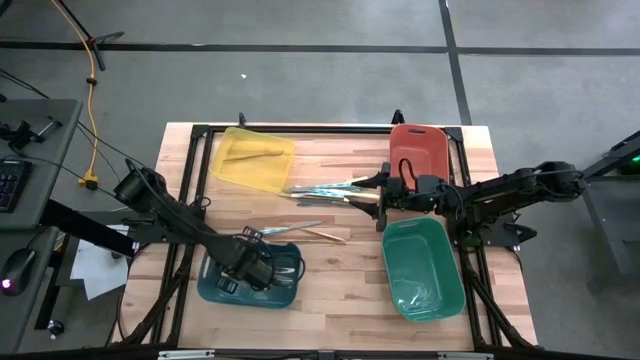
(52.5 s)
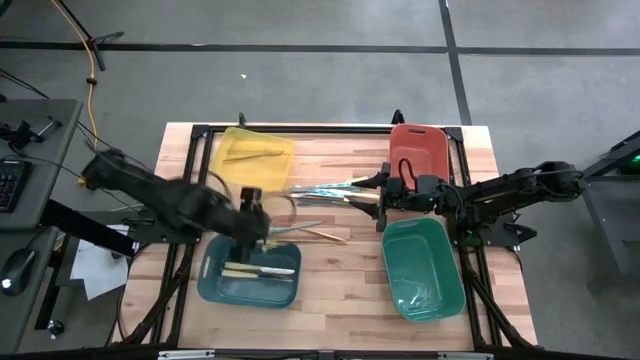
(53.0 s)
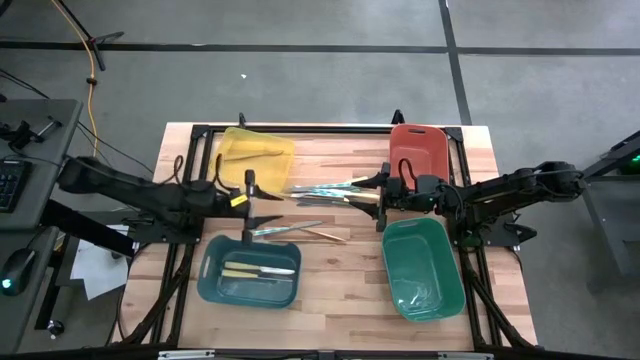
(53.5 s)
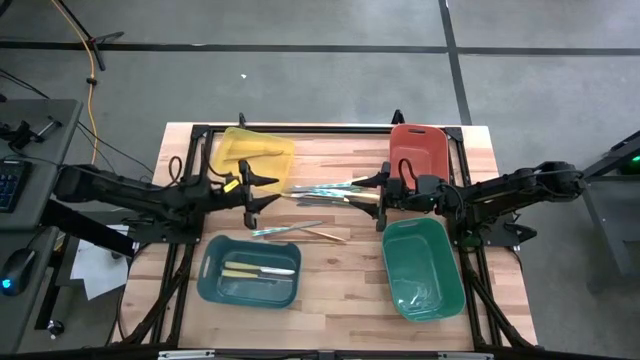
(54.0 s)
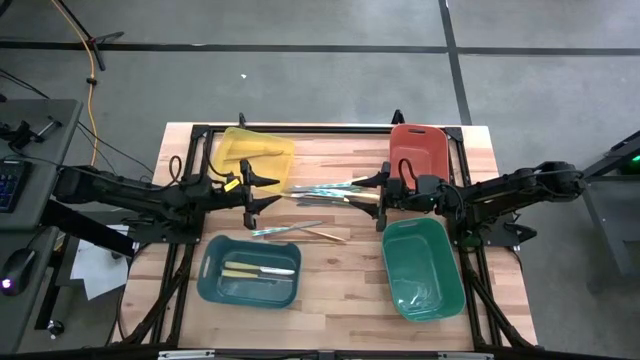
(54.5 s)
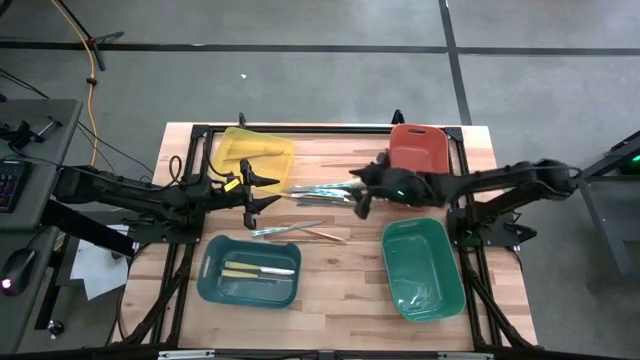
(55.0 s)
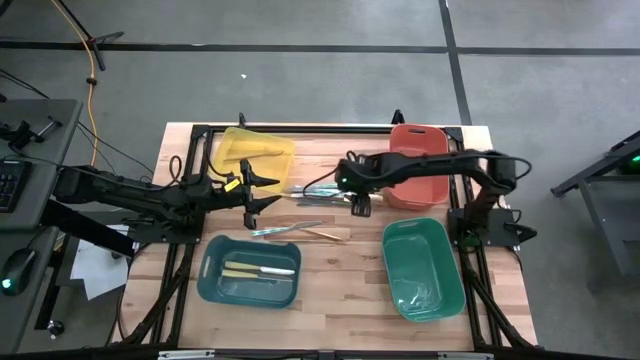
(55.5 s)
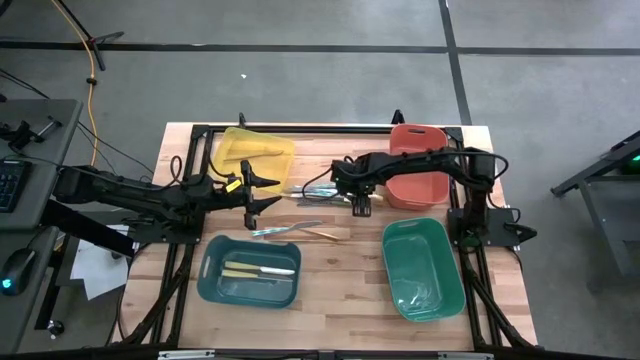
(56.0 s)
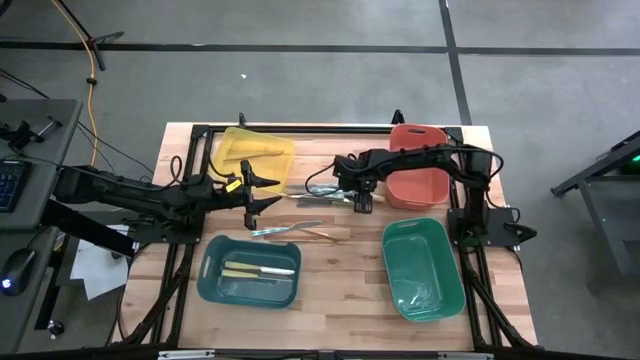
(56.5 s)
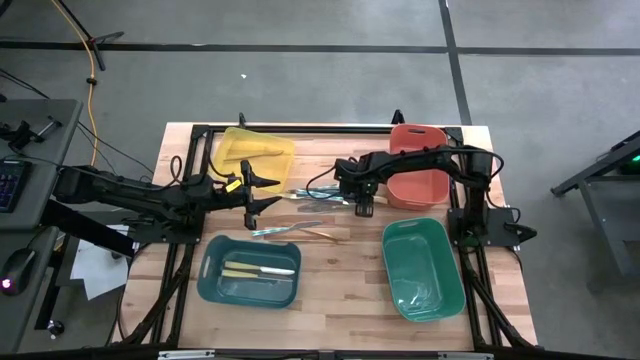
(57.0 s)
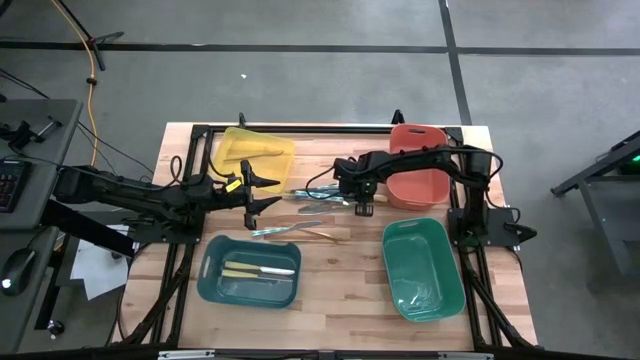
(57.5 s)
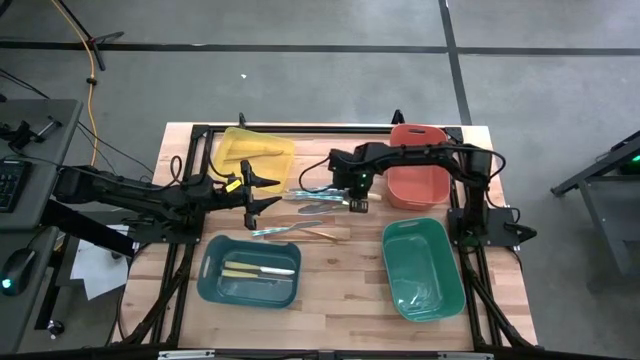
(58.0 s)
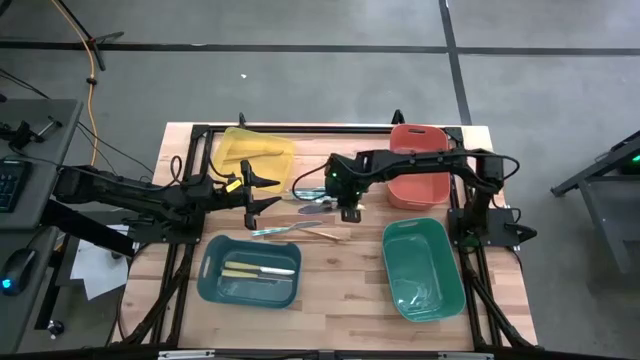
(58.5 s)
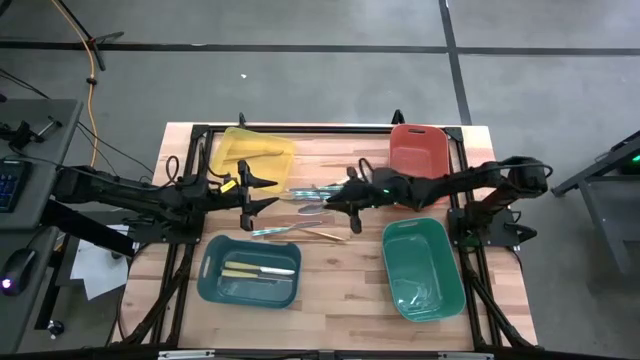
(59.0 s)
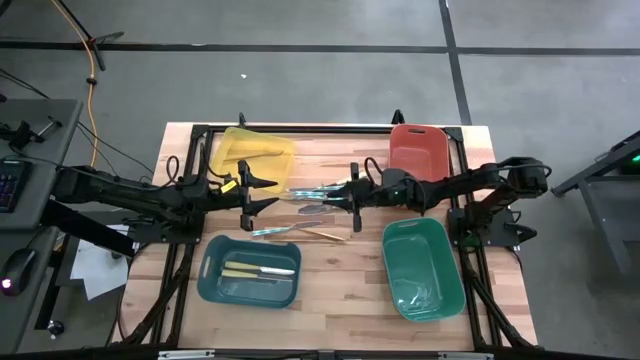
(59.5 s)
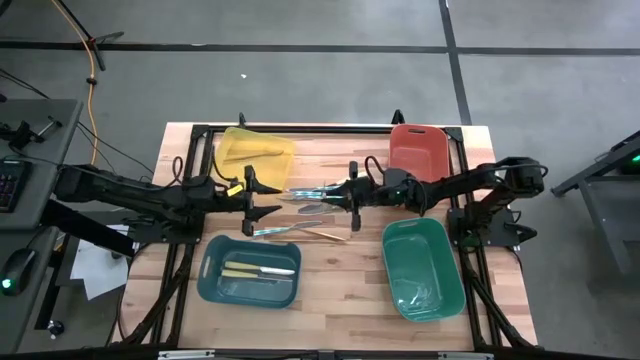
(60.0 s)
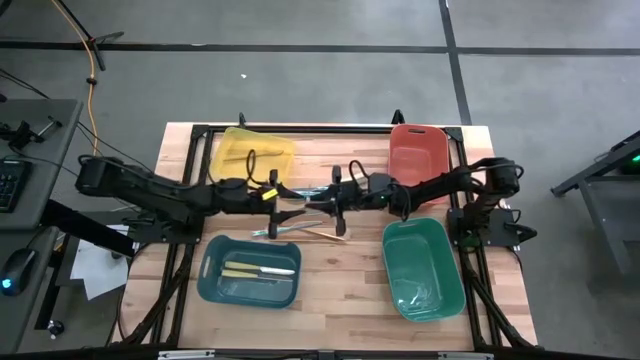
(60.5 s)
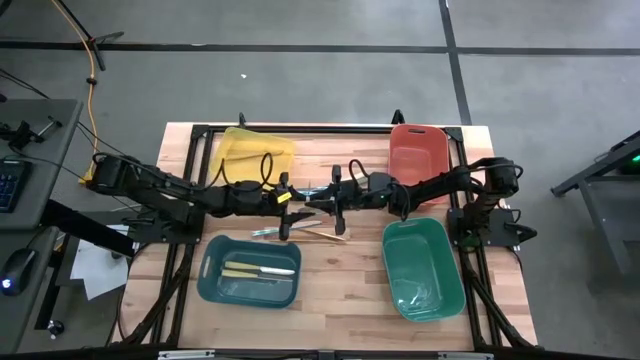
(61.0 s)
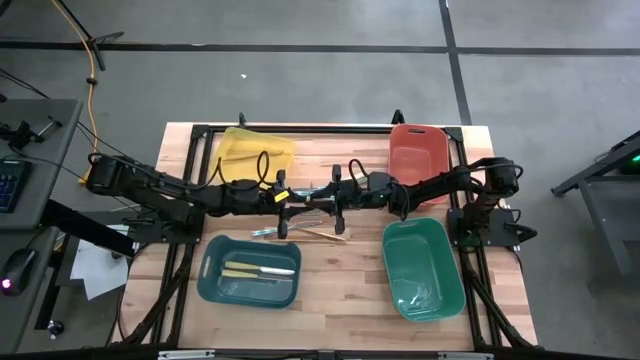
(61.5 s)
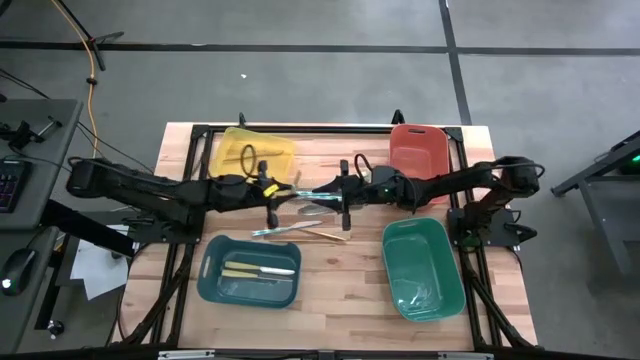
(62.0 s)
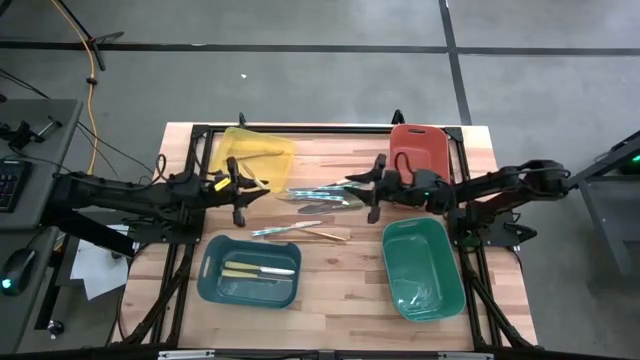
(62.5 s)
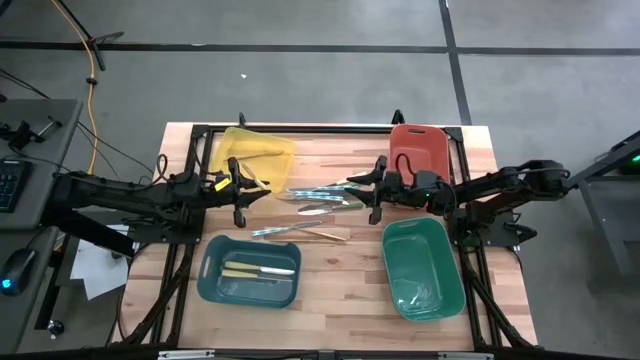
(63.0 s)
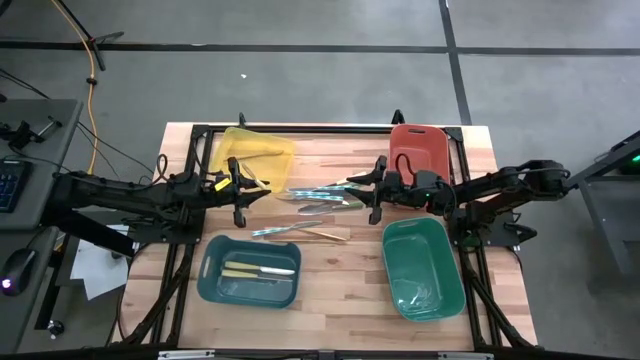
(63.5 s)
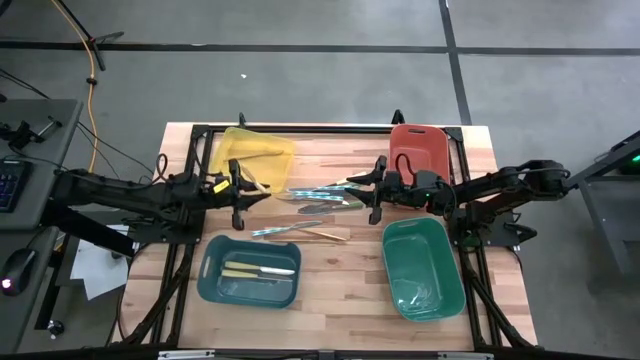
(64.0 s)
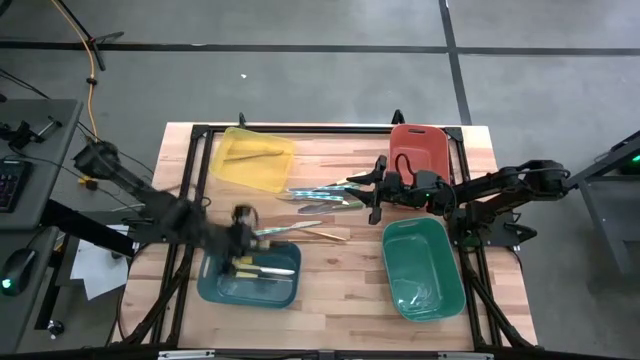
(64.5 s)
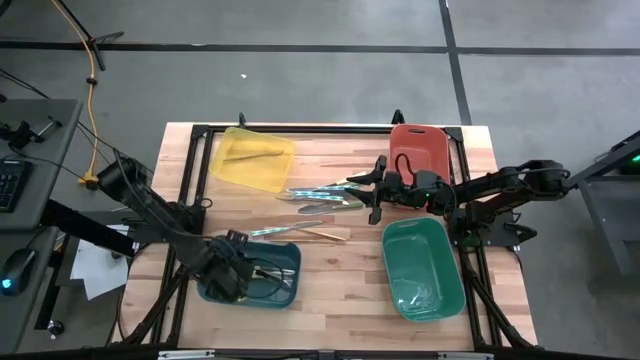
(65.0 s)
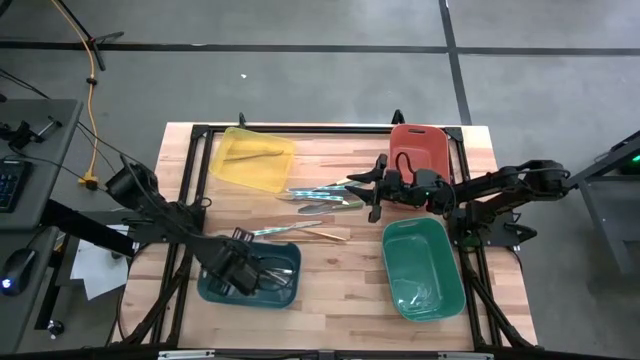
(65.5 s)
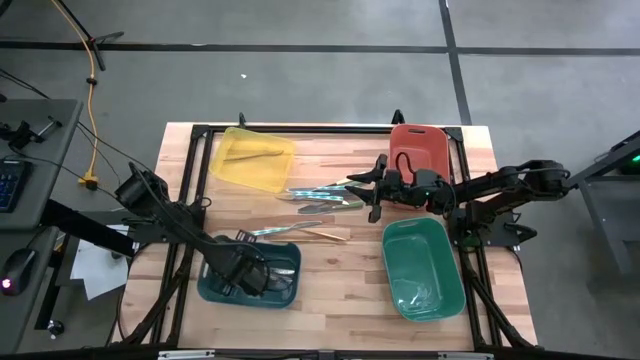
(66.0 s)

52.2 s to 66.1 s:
Task: Sort silverware by color (type)
Put the yellow knife into the blue bin

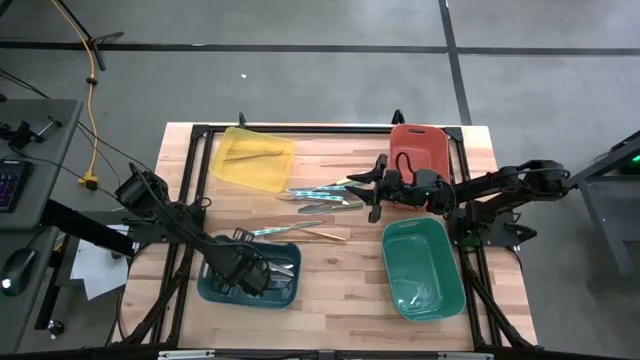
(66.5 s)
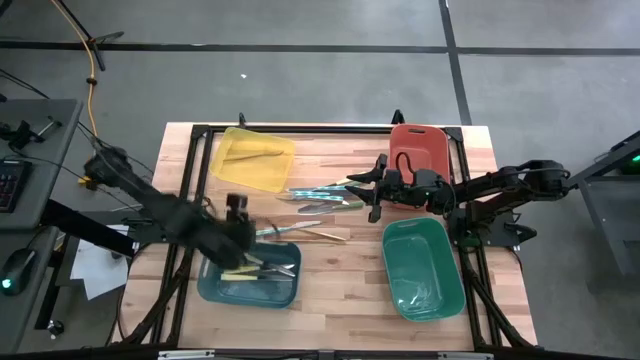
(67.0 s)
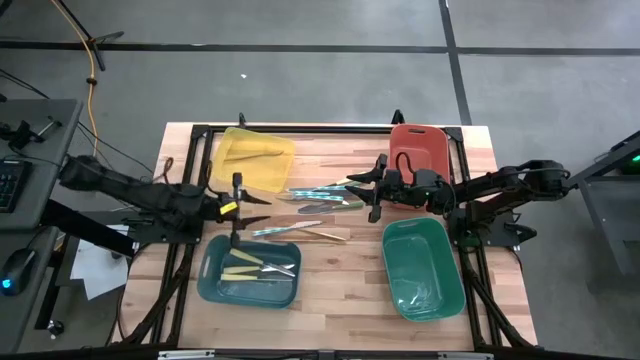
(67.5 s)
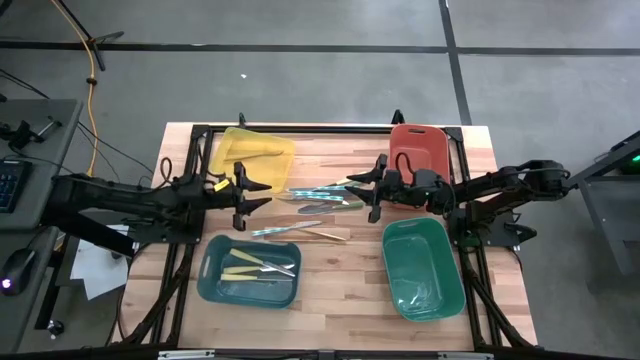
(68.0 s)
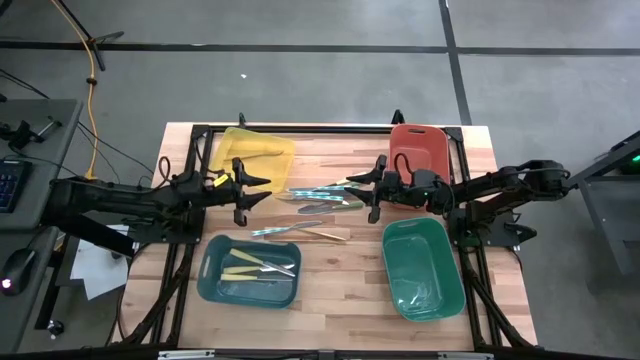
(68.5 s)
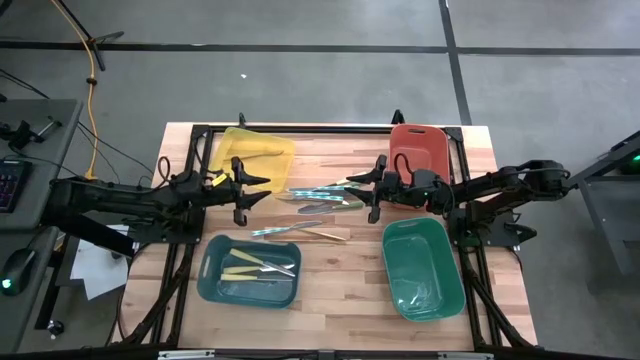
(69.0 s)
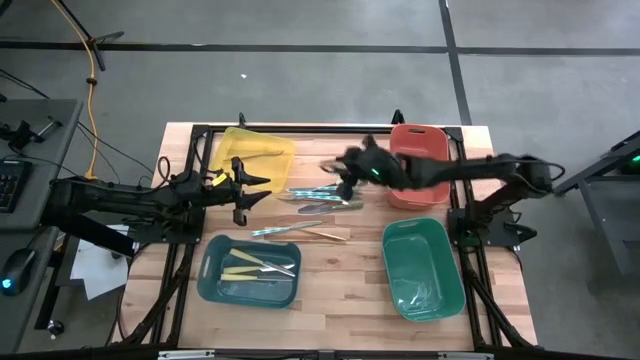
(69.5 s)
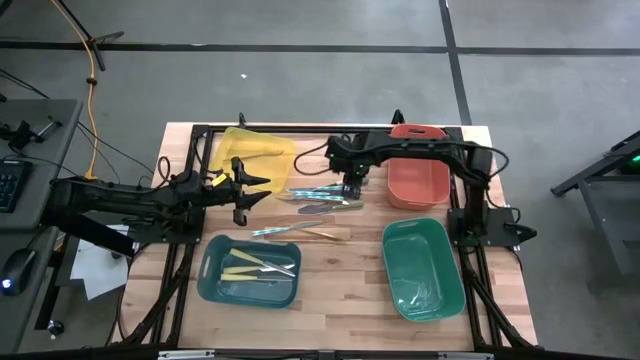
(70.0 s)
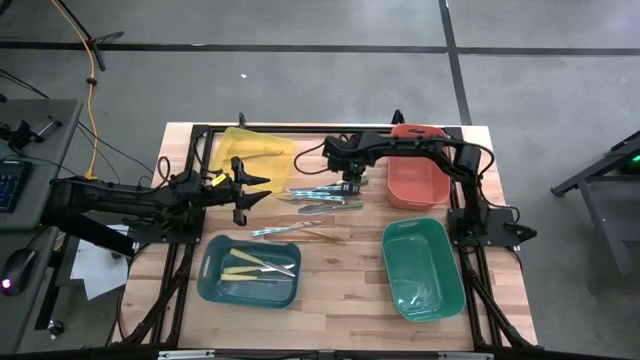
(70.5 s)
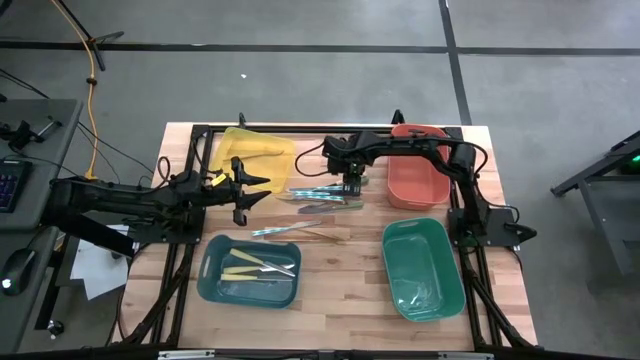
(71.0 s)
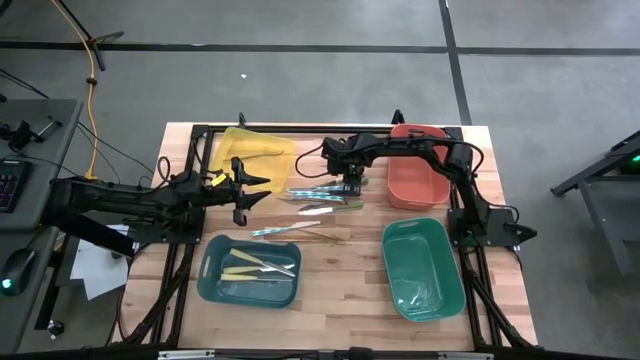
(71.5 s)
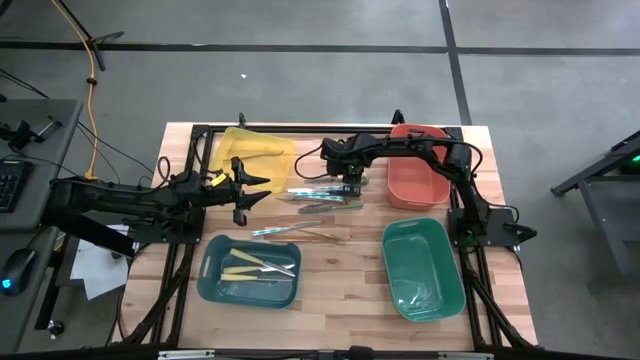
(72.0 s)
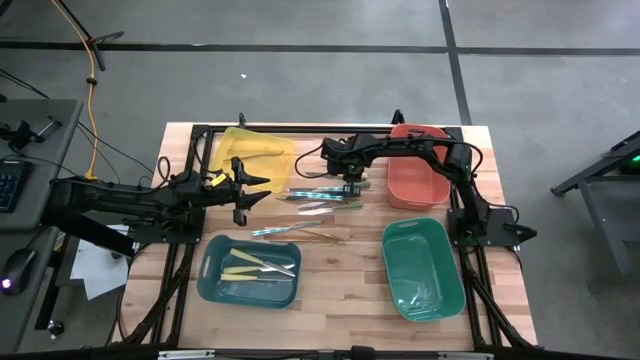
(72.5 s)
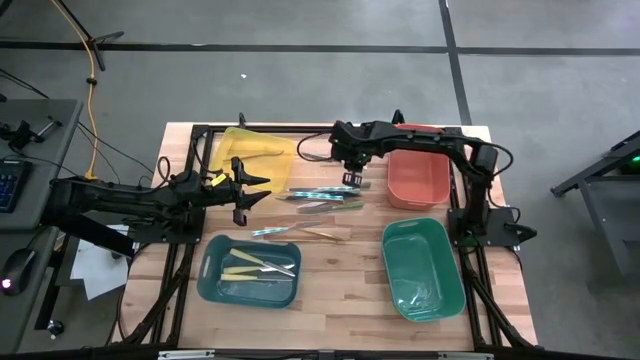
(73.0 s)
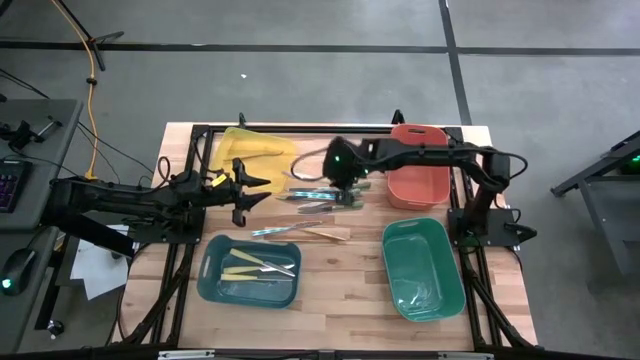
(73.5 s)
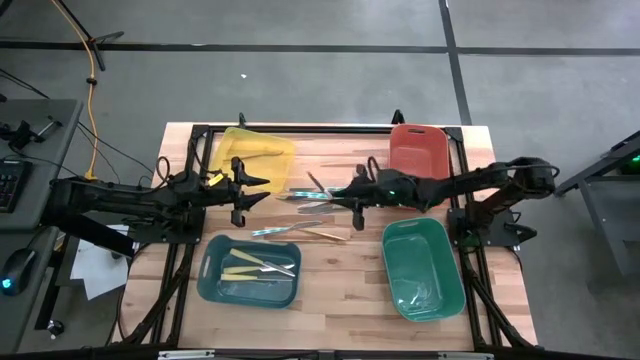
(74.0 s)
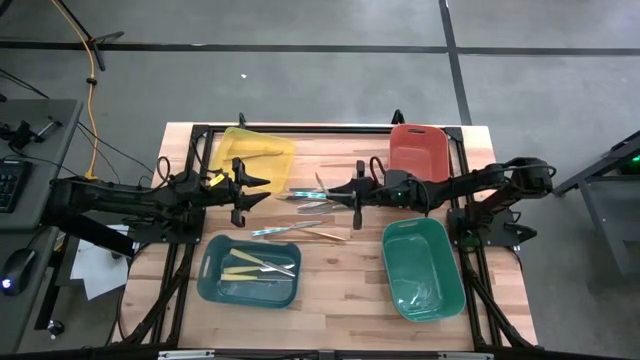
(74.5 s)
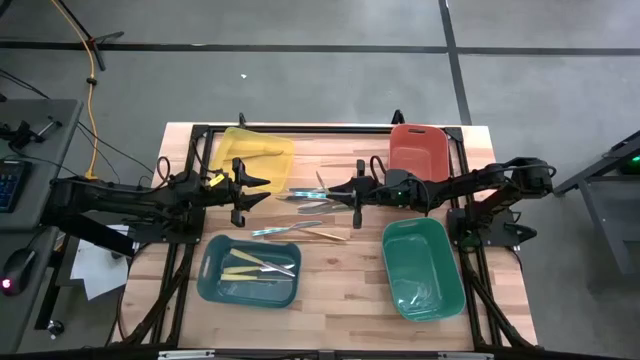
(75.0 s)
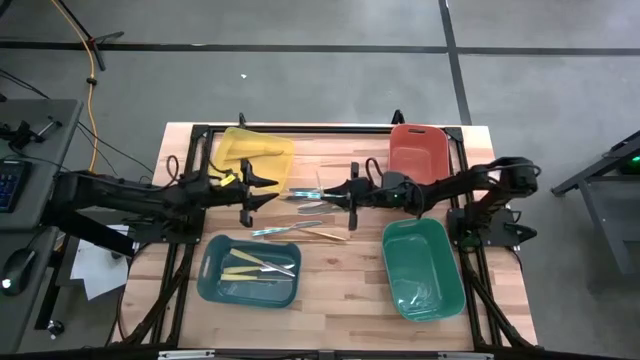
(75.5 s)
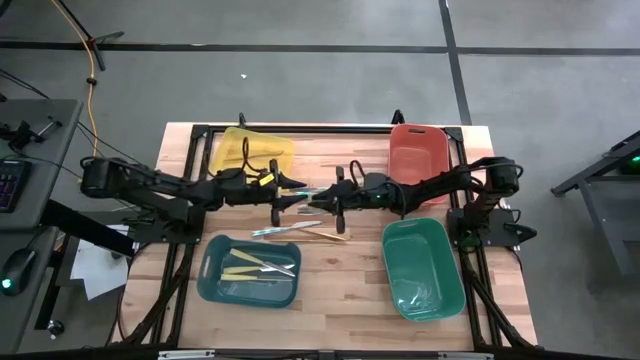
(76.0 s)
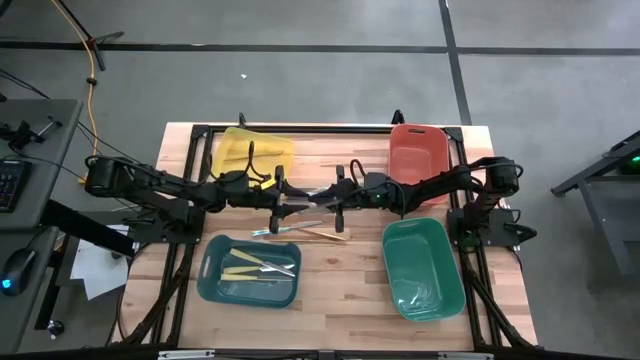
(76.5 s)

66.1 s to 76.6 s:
Put the yellow knife into the blue bin
